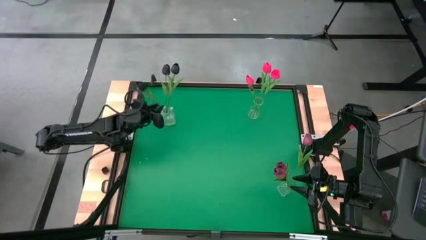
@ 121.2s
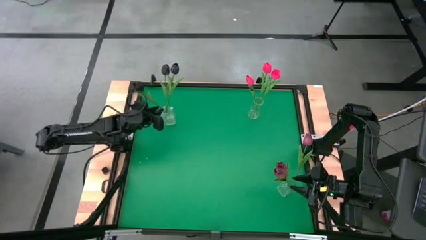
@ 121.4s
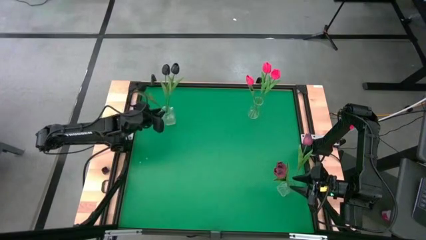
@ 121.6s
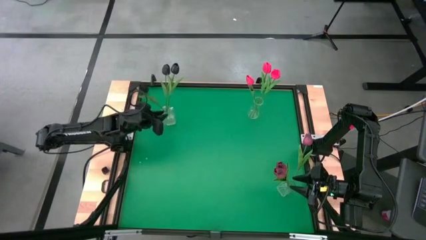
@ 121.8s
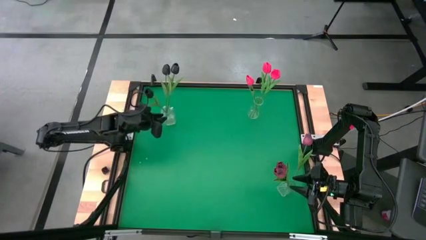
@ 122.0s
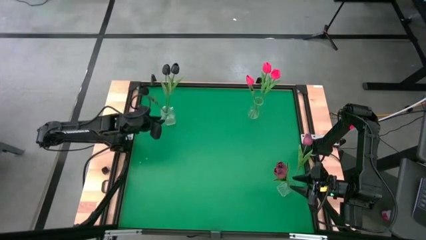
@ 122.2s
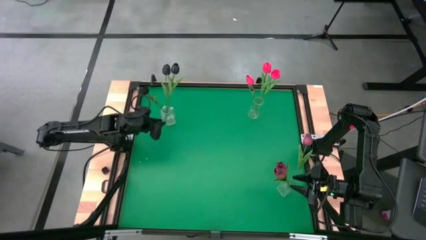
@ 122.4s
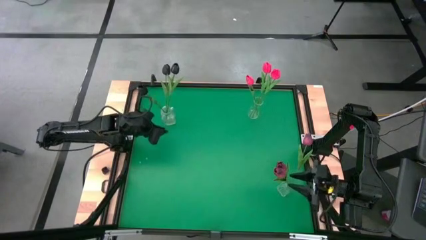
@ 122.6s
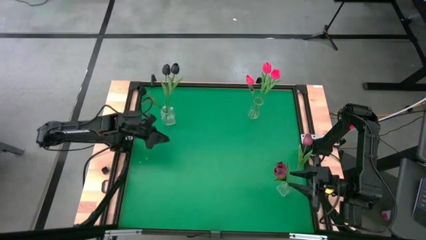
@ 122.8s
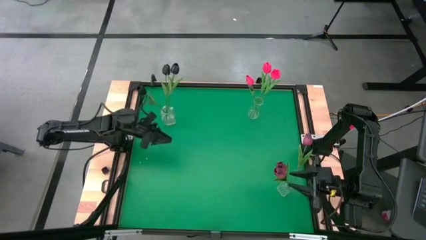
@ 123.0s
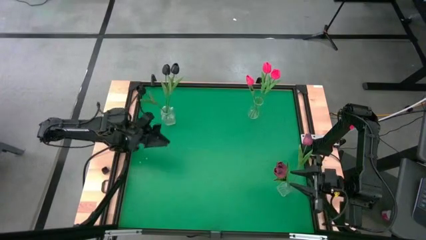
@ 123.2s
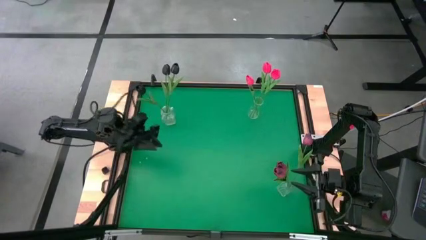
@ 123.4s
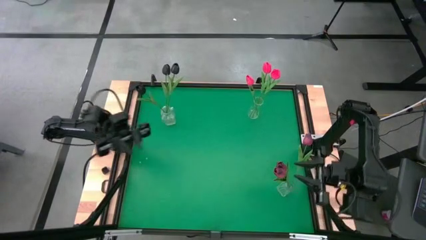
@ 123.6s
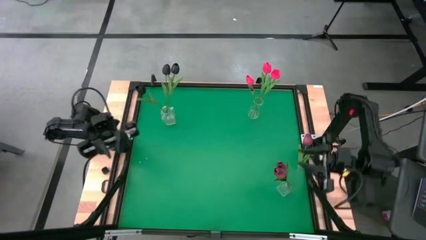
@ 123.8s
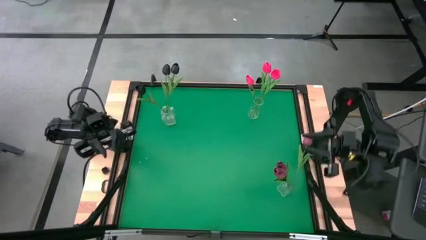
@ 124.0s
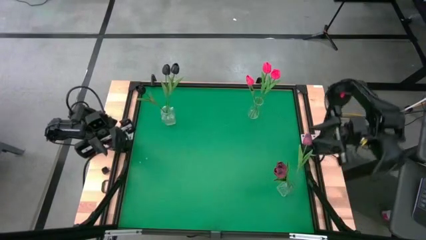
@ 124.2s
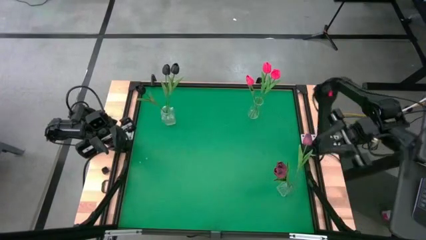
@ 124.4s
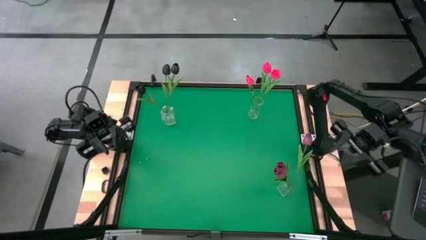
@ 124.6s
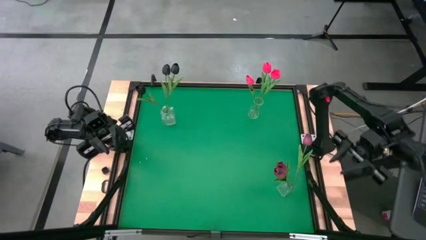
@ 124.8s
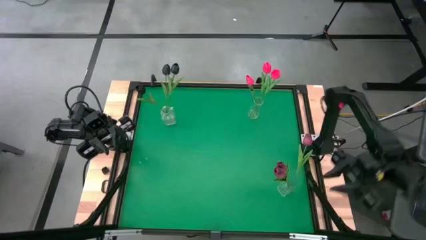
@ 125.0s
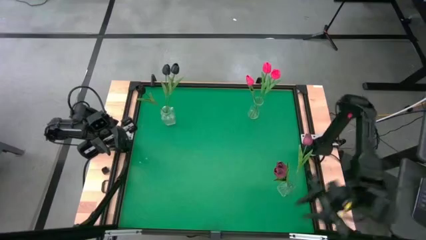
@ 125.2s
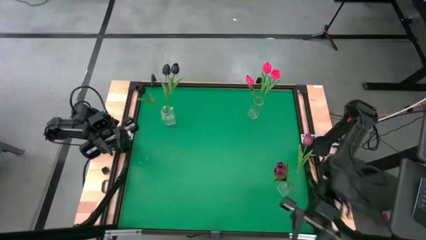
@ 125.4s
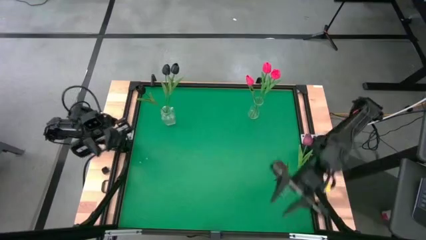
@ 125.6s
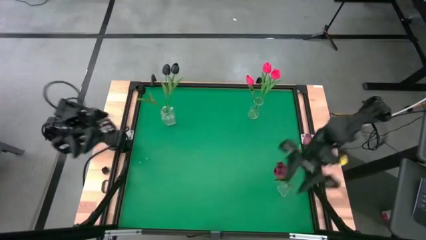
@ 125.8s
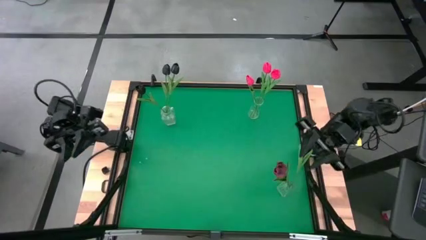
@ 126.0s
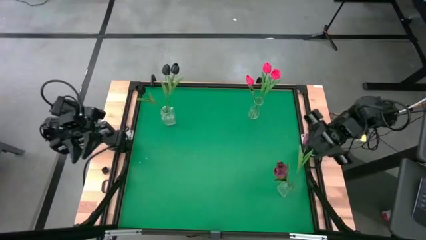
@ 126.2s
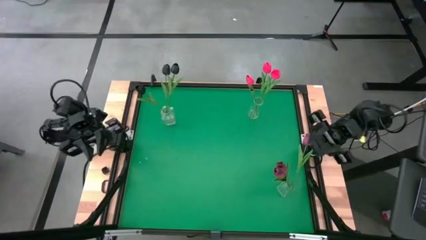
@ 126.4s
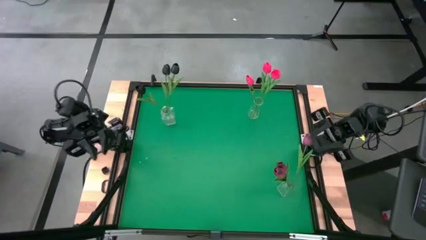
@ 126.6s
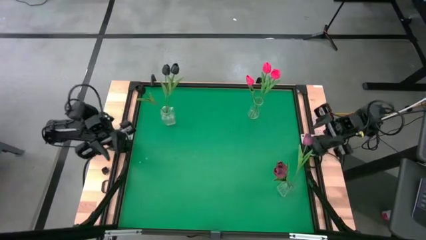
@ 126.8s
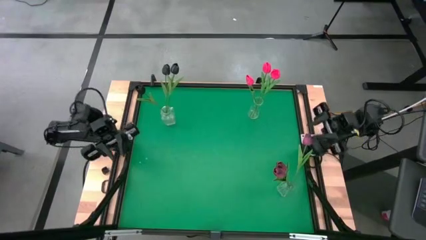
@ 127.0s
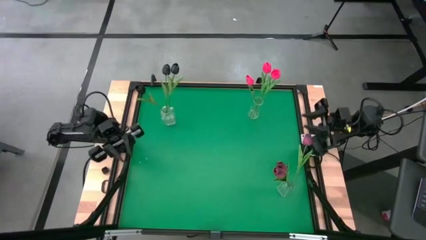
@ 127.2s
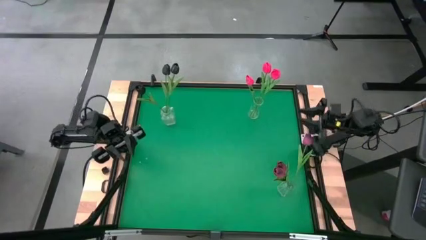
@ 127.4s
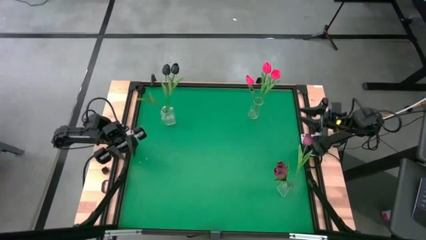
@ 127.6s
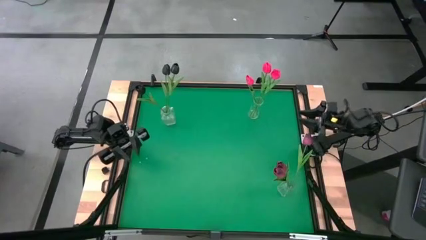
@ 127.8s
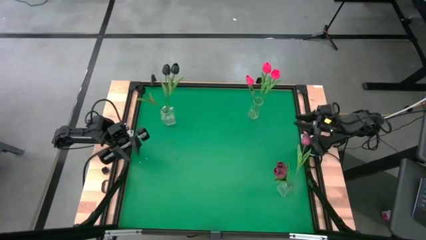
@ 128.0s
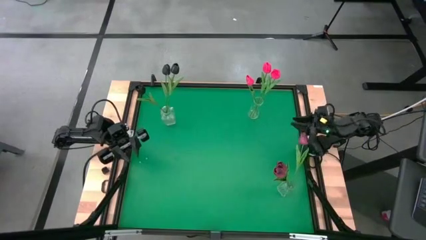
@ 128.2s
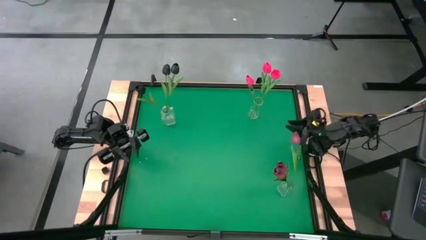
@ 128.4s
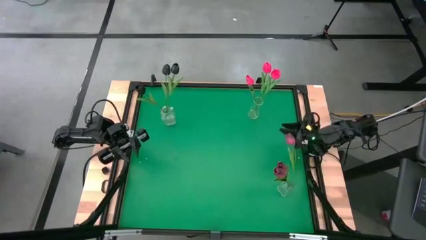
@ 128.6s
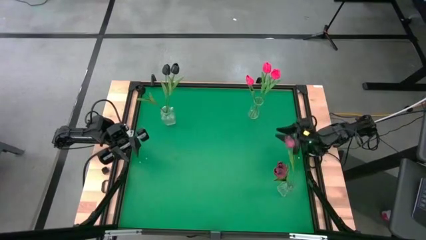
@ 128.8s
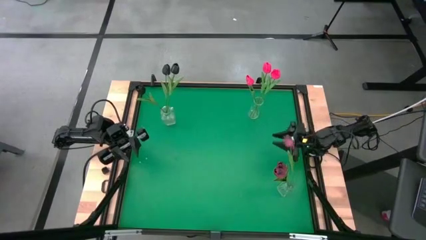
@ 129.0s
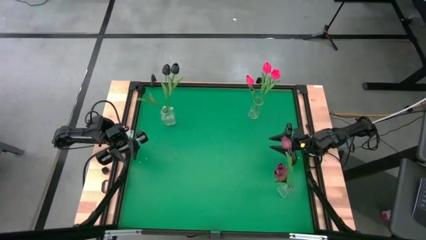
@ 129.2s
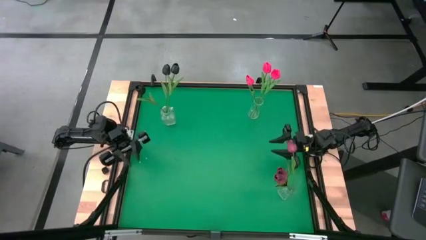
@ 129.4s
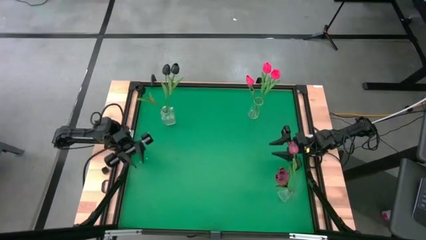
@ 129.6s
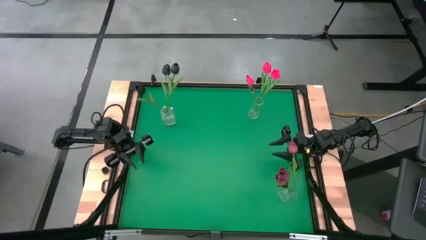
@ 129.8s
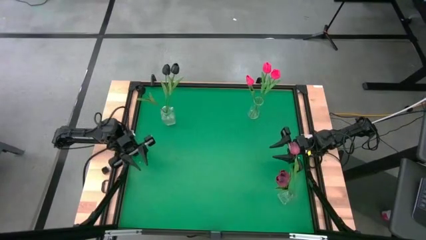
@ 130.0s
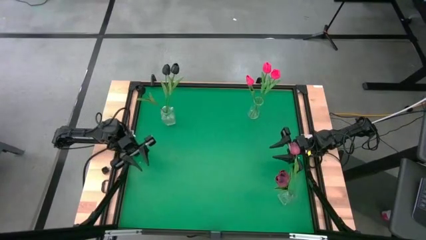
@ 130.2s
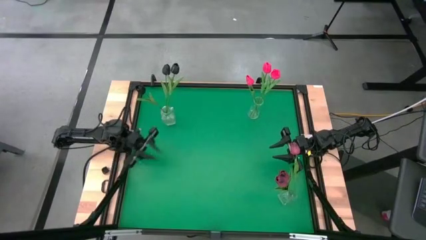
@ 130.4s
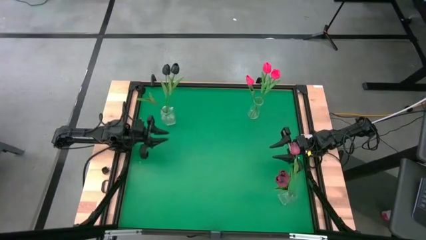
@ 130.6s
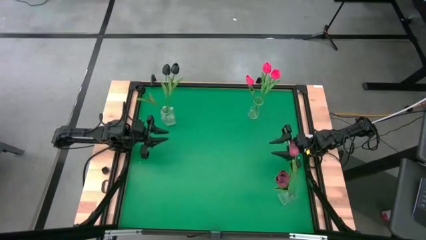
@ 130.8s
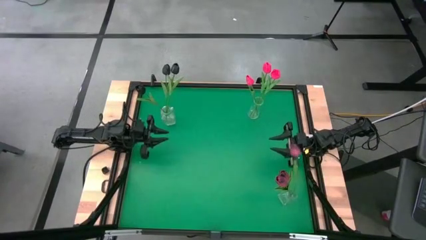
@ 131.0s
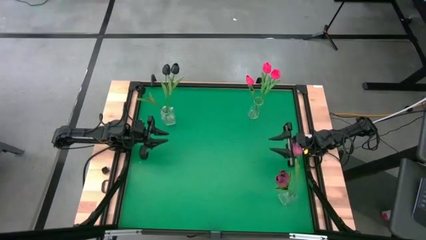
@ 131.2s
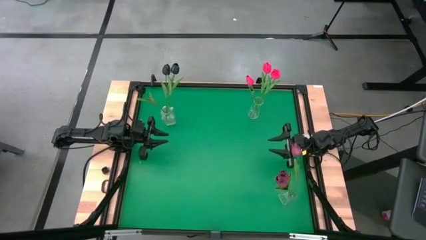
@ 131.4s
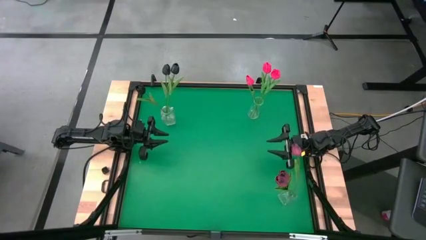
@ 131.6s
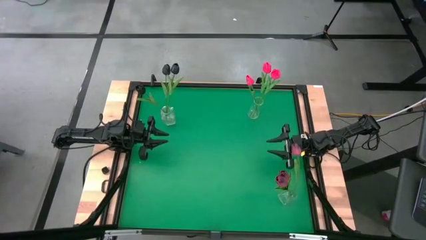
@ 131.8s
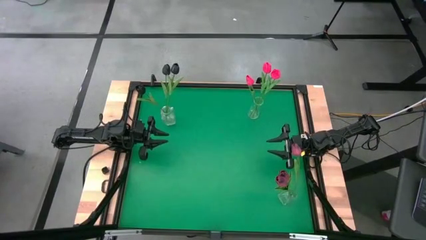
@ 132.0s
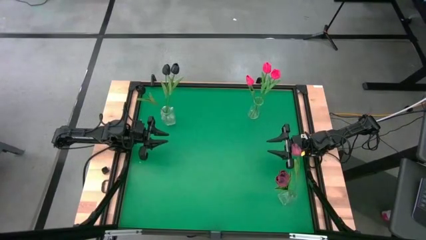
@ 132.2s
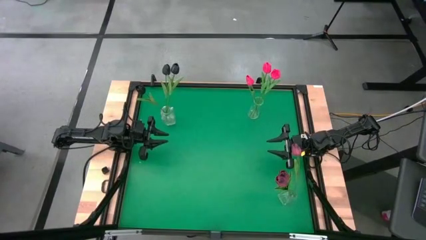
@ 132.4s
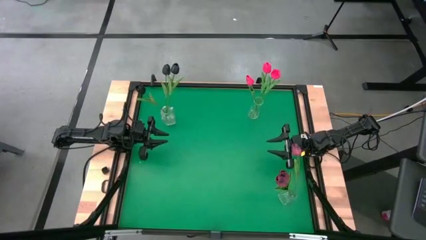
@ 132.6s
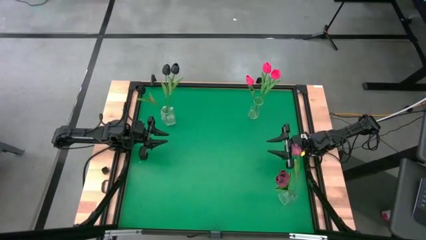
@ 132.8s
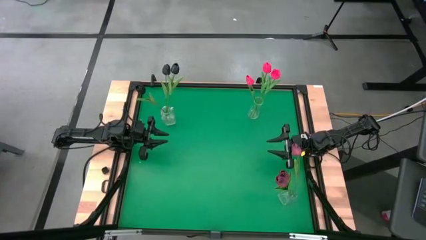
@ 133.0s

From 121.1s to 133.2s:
Task: Sort flowers into vase by color
Return to Home Position

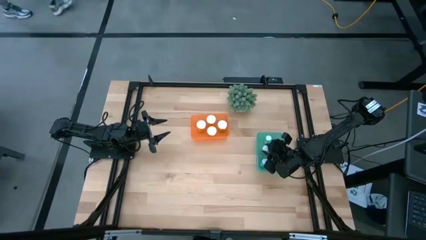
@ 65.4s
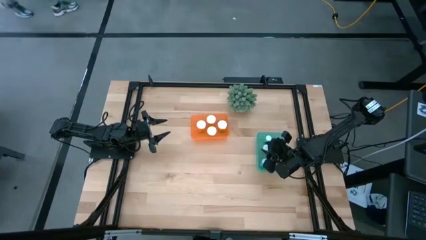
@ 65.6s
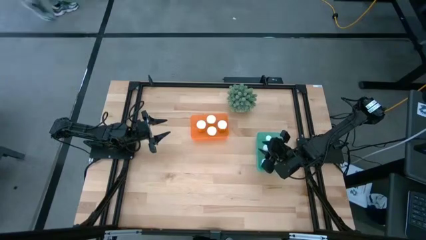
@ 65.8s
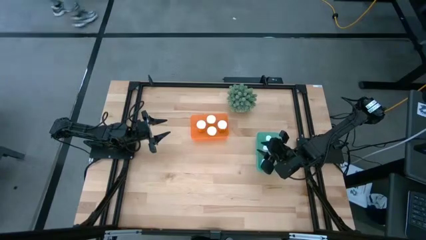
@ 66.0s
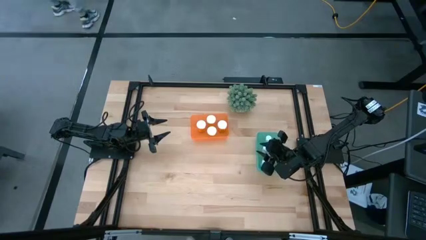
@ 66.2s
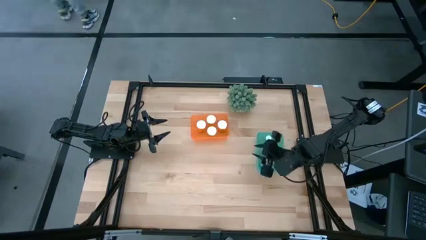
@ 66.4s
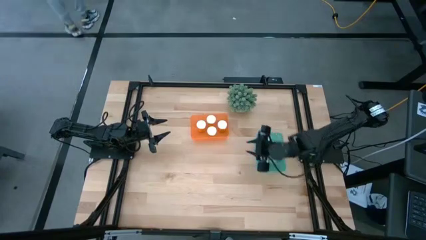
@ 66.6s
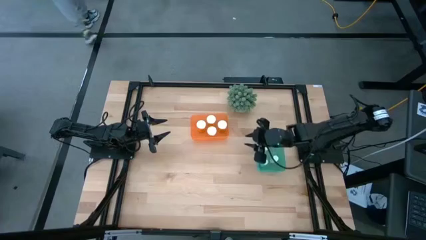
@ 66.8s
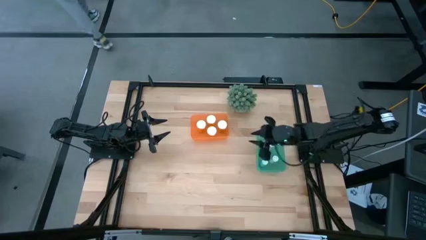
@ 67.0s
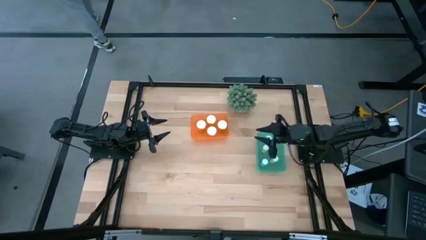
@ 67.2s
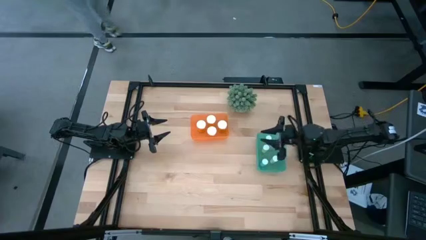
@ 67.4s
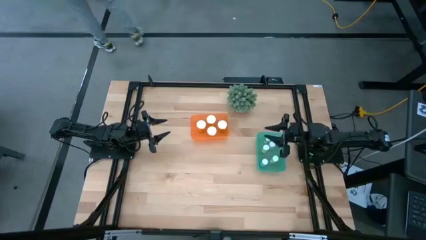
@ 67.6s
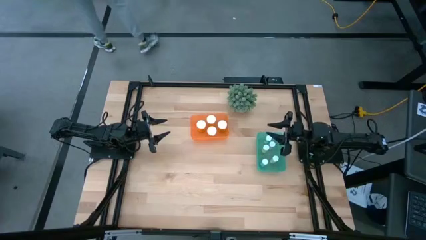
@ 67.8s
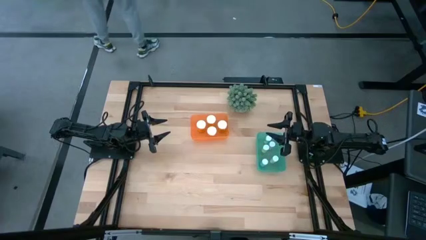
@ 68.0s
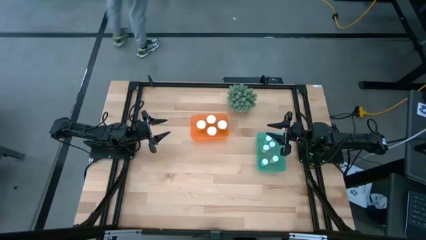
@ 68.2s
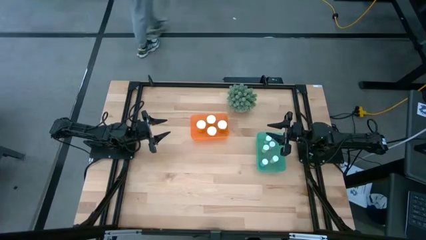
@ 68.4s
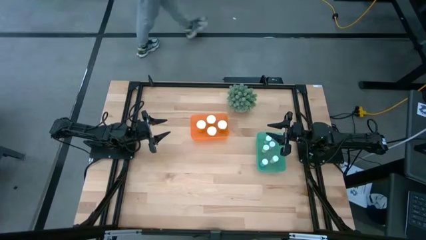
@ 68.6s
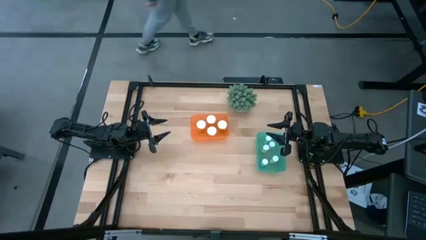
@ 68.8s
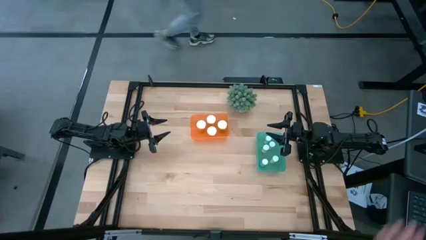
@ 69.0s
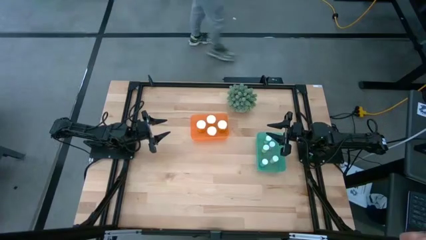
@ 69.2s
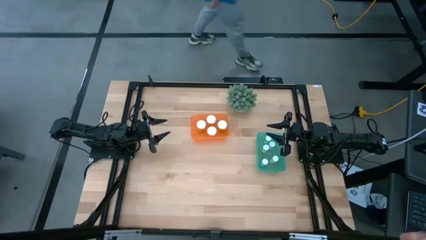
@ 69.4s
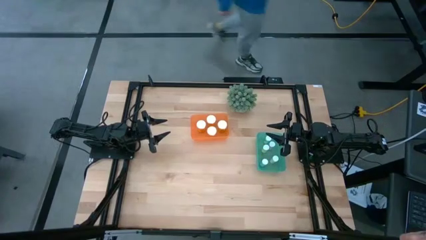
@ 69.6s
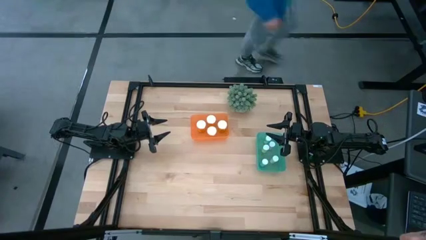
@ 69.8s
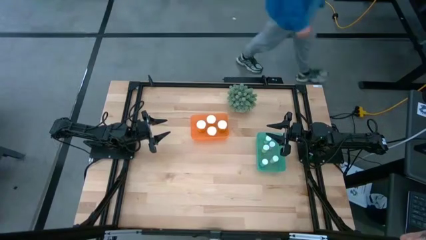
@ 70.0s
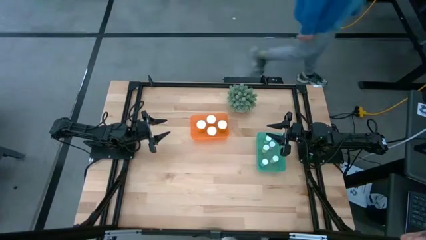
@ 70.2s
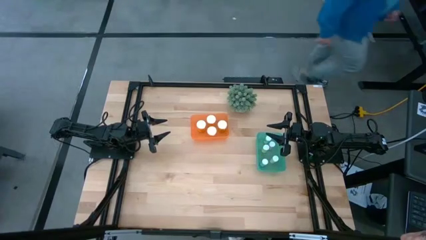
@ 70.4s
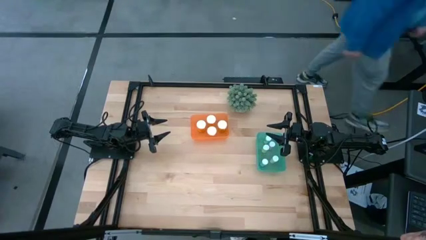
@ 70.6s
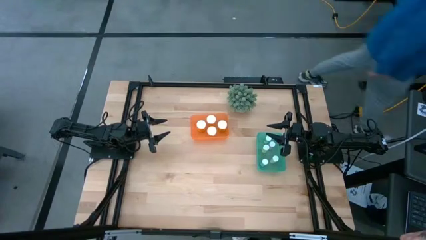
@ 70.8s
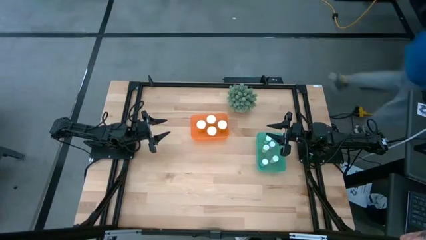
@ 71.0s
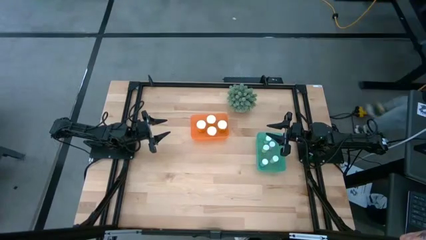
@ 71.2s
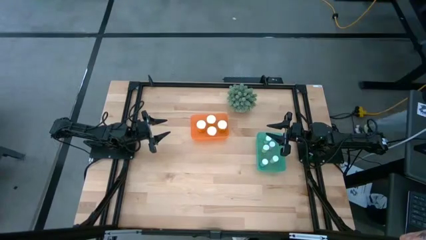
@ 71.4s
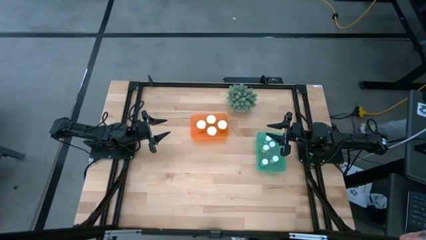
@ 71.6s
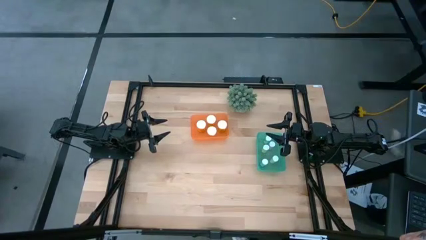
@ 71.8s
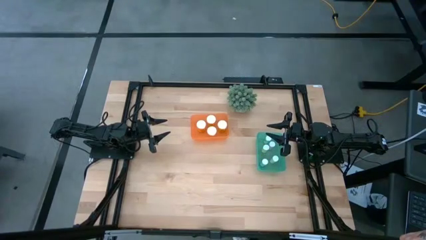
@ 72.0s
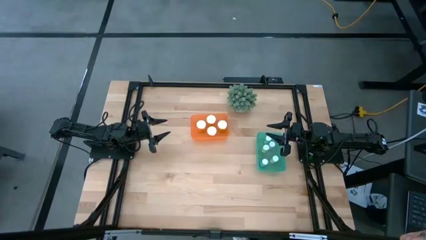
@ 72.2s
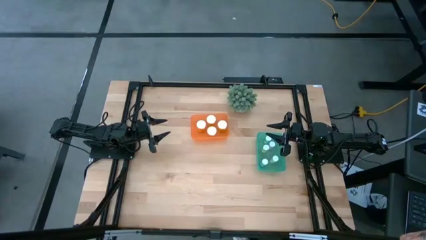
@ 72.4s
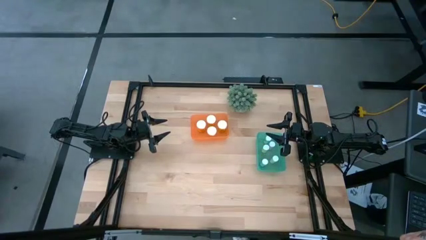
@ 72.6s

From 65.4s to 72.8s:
Task: Pick and place medicine bottles into bin by pill shape (circle, oval)
Return to Home Position
